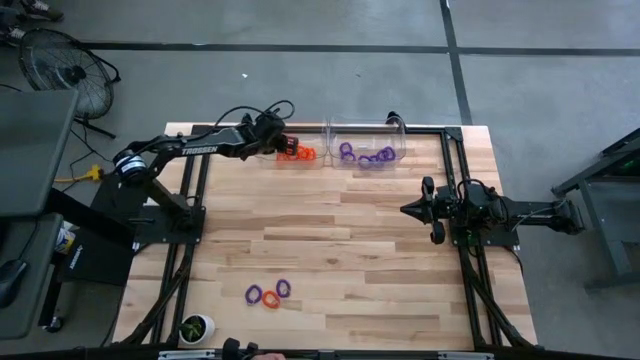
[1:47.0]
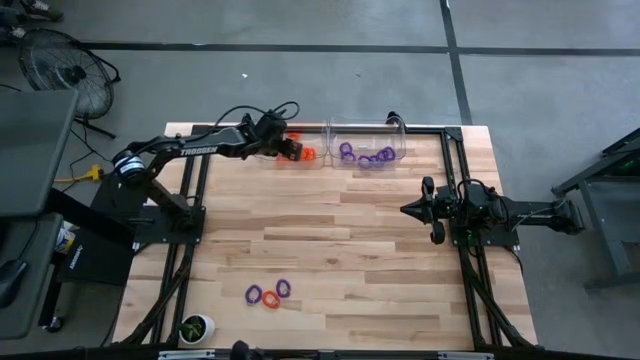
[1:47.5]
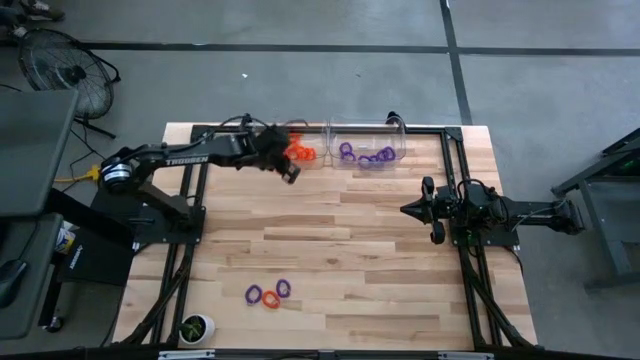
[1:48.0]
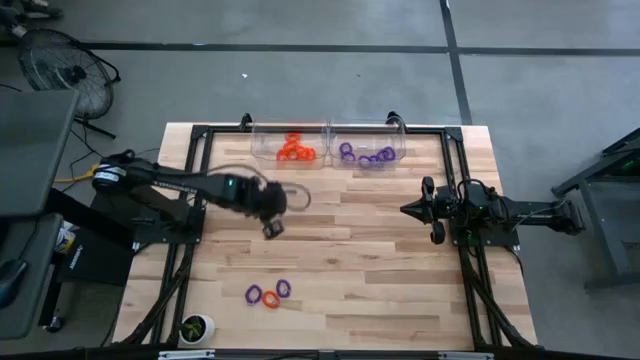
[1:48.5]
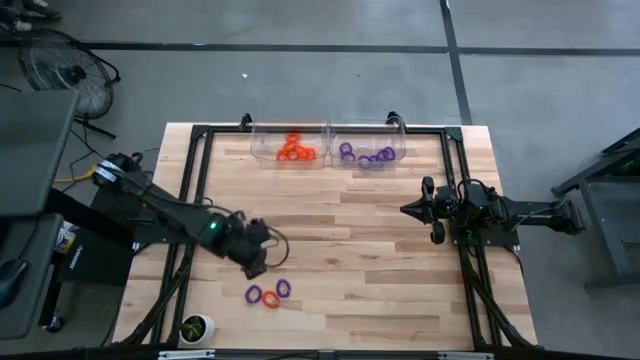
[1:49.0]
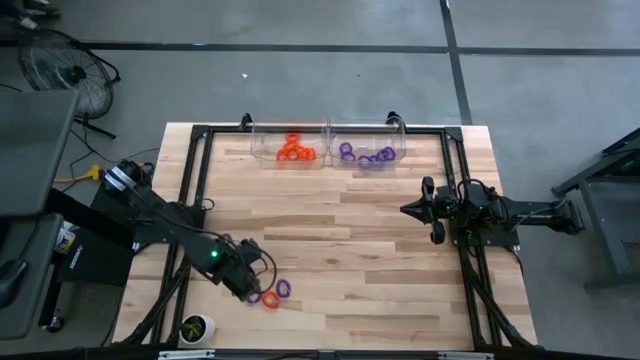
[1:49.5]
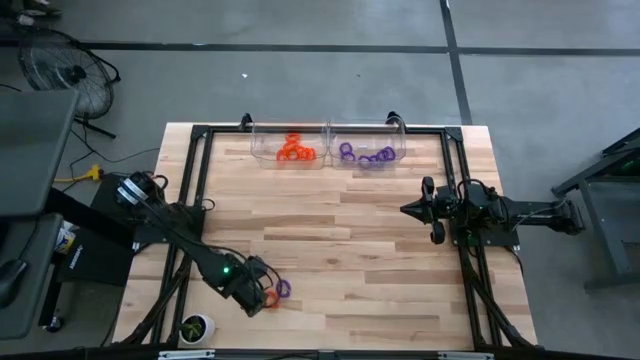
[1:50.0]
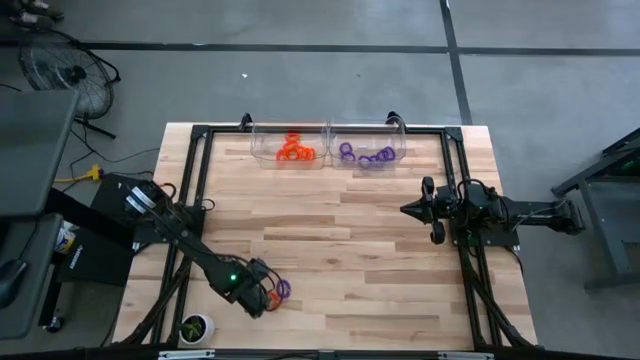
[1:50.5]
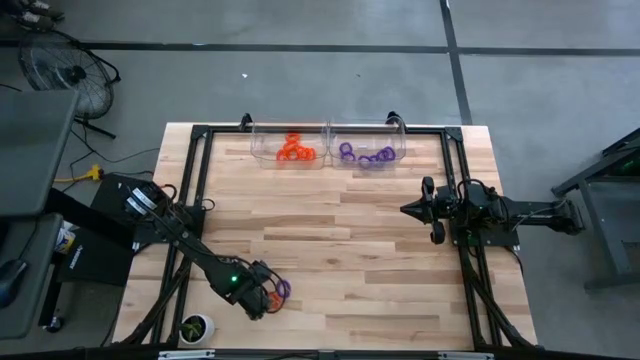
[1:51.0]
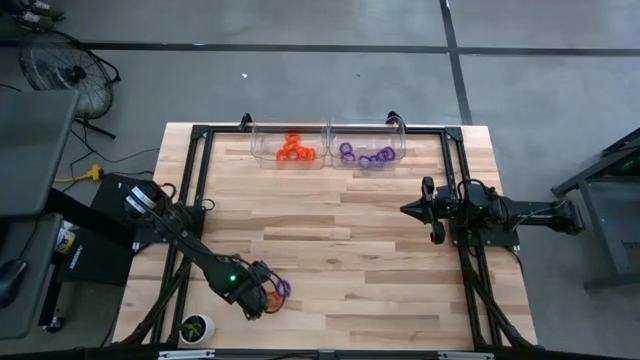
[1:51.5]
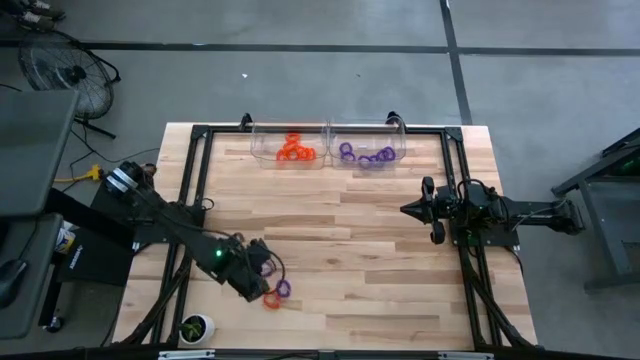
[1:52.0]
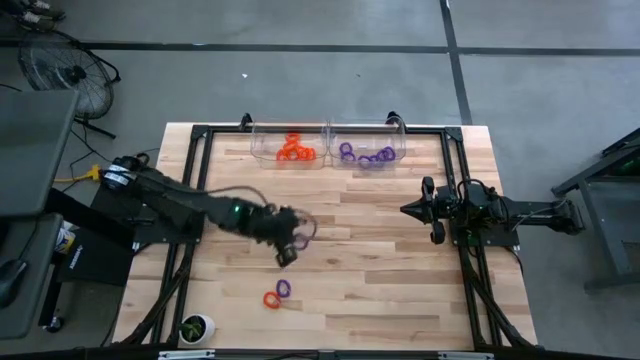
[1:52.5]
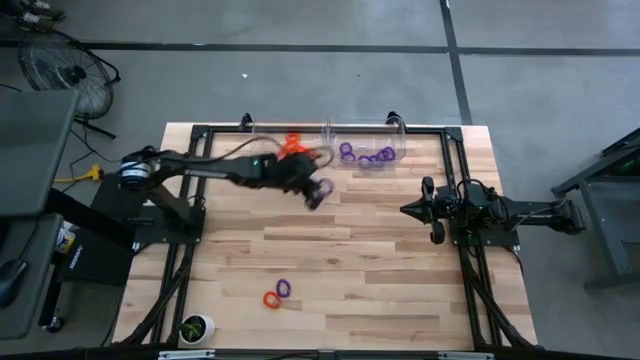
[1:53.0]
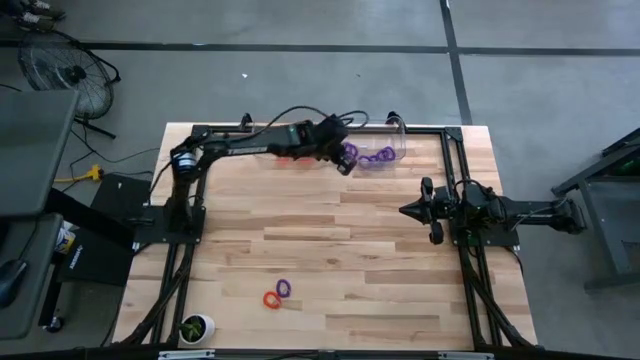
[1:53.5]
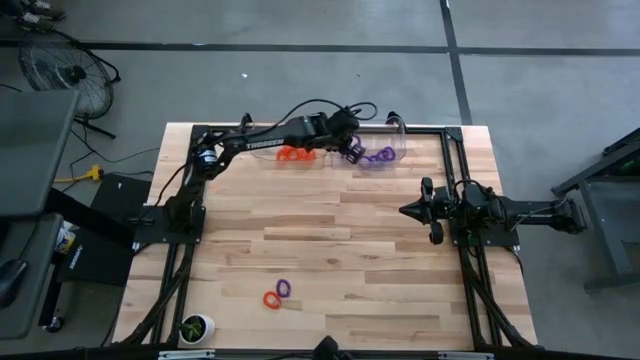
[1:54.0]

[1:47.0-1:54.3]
Task: Sort spring keychains
Put the violet spring keychain into the right transparent bin

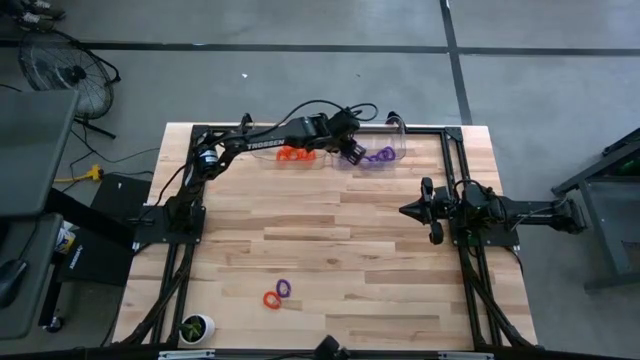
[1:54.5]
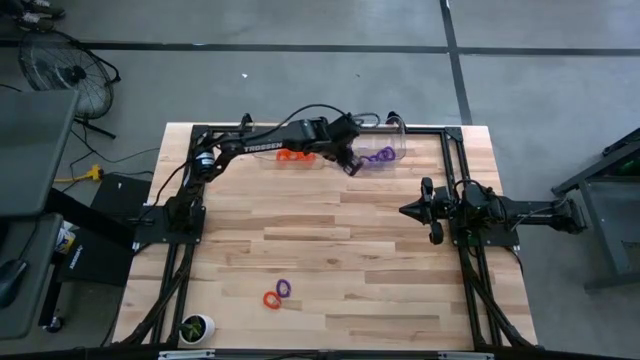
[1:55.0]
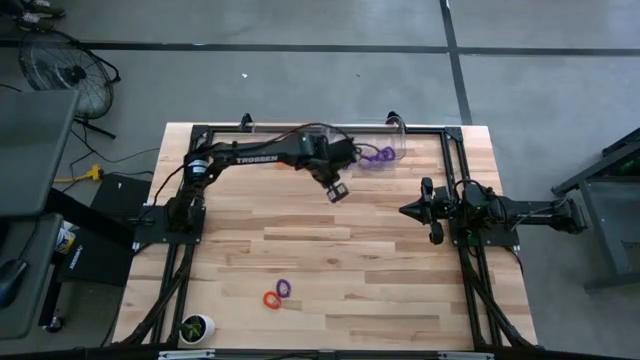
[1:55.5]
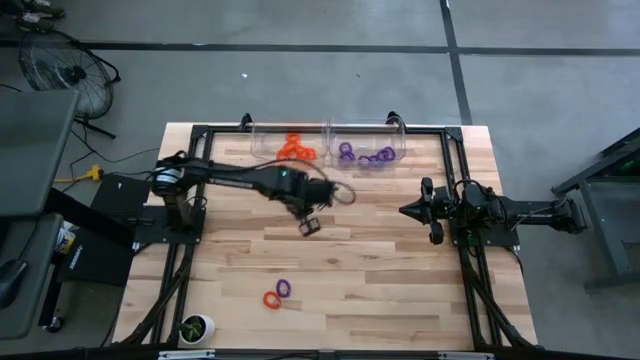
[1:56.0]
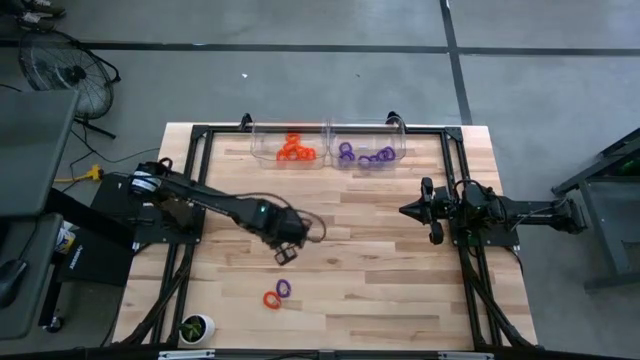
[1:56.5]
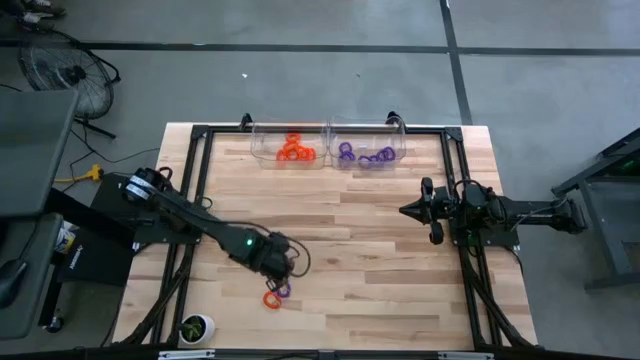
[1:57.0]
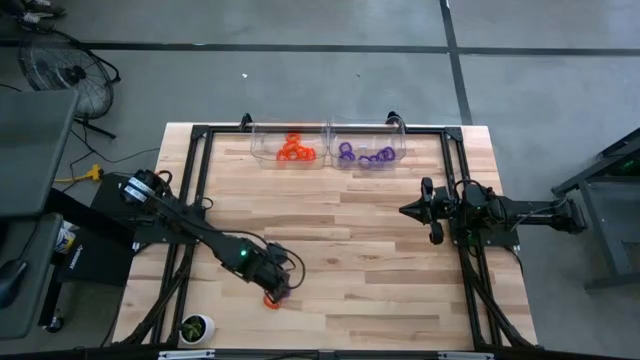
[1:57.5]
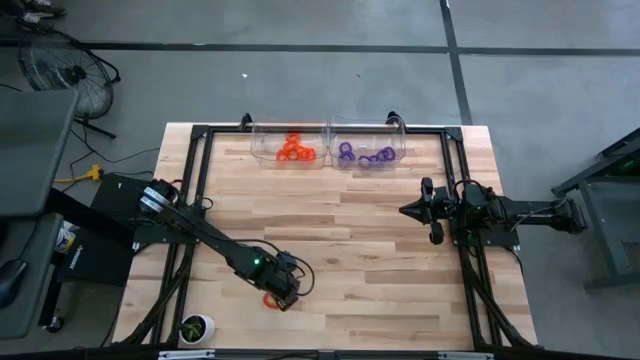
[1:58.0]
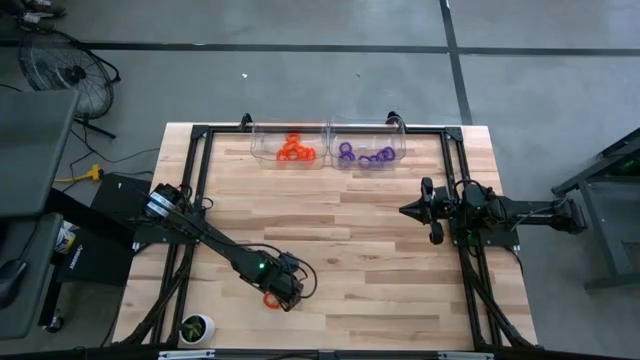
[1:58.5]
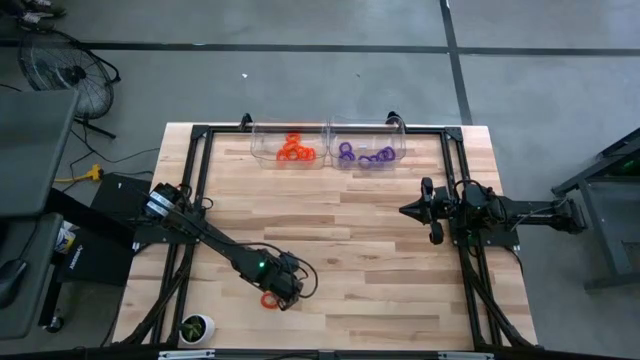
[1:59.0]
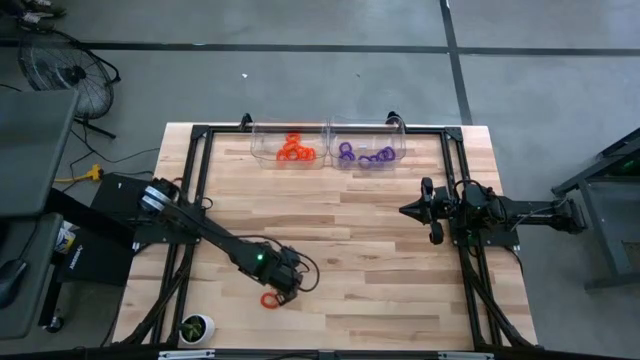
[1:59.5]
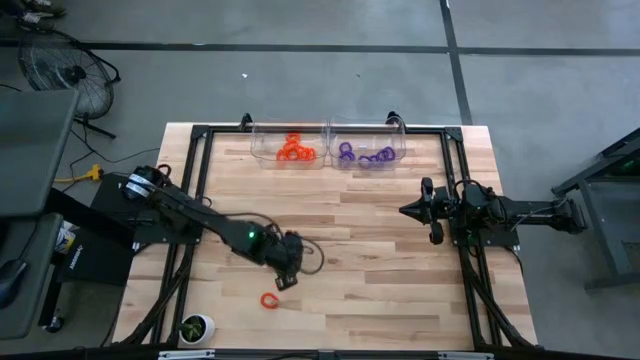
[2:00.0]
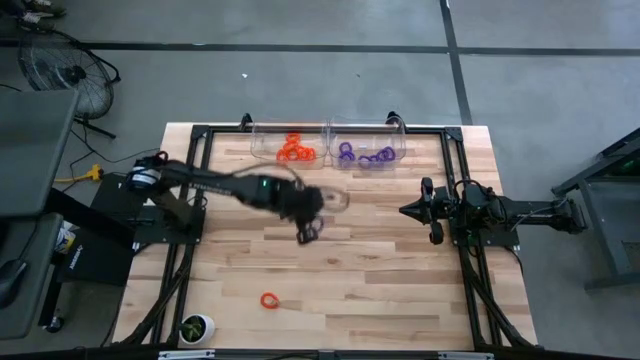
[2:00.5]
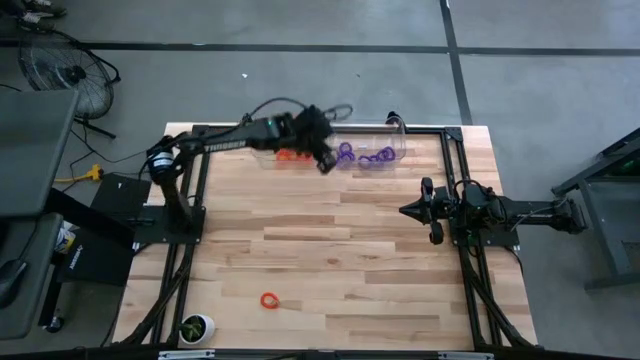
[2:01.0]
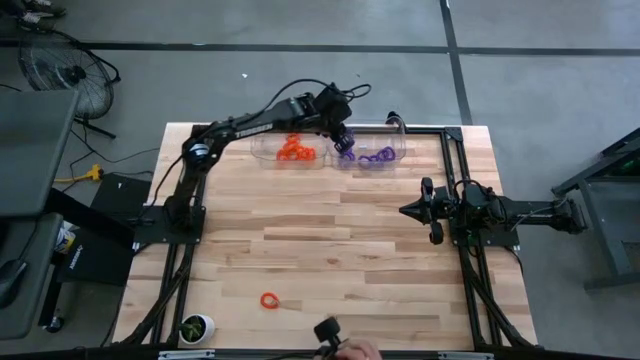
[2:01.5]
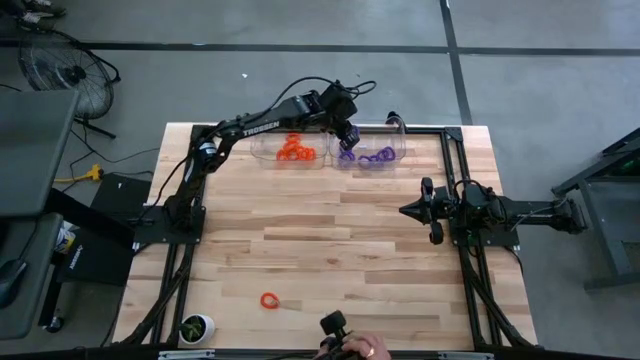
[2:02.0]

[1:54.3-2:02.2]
Put the violet spring keychain into the right transparent bin

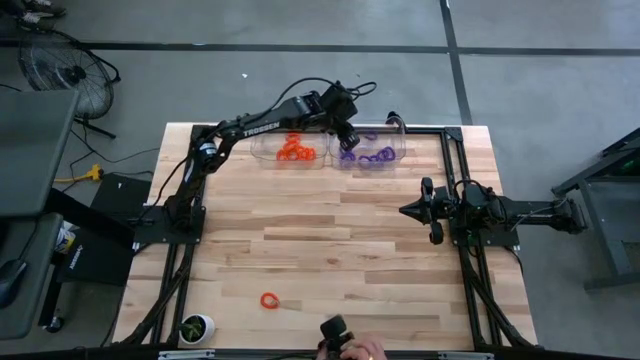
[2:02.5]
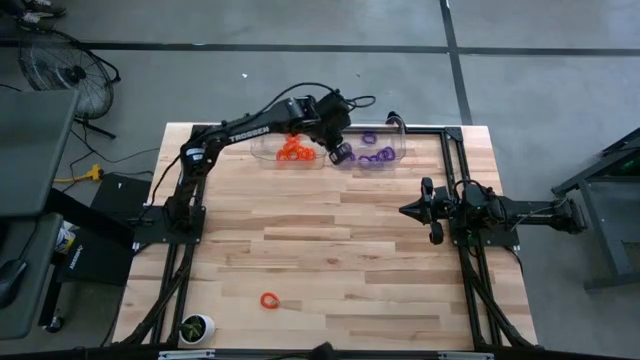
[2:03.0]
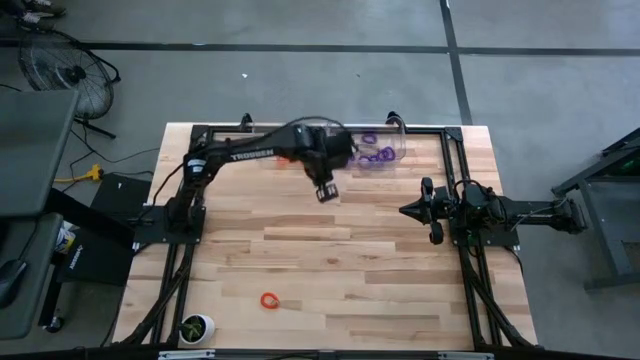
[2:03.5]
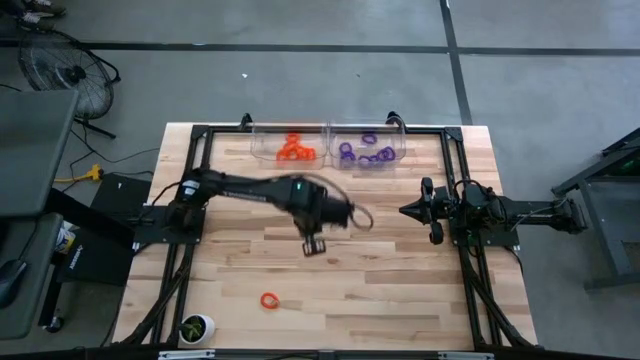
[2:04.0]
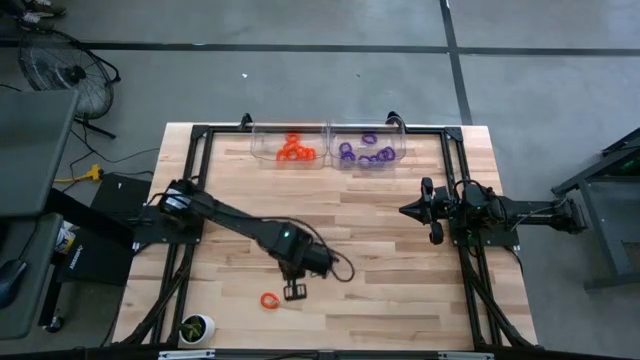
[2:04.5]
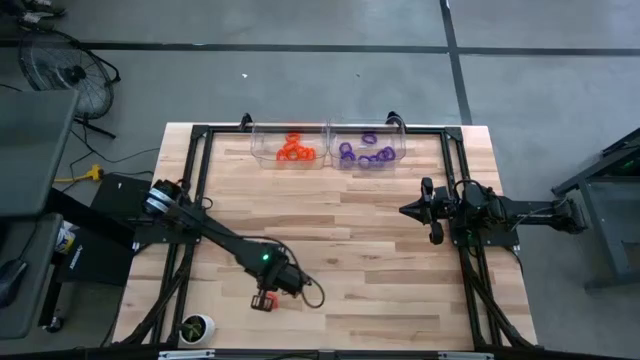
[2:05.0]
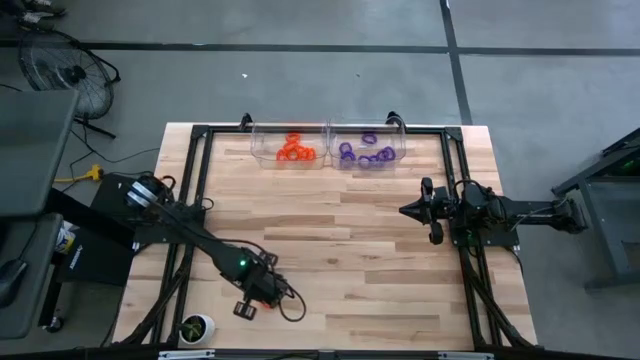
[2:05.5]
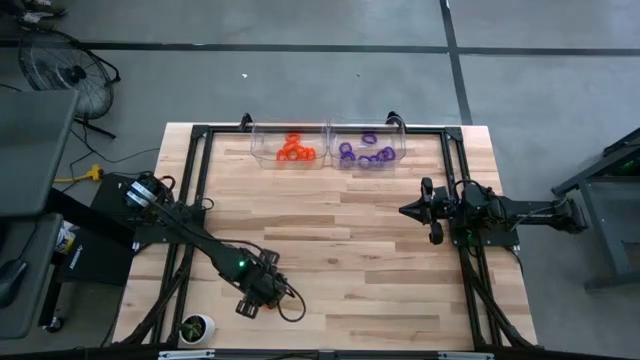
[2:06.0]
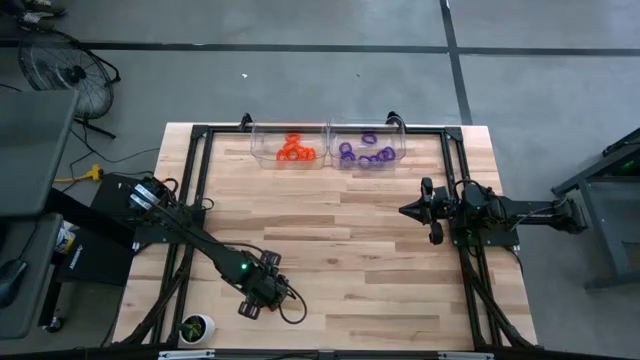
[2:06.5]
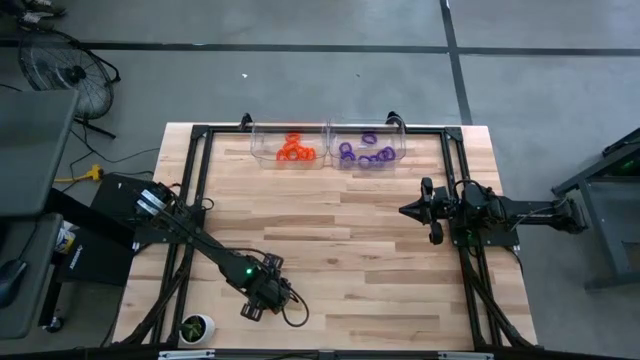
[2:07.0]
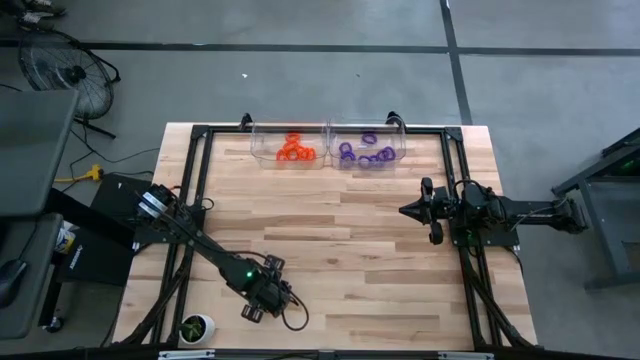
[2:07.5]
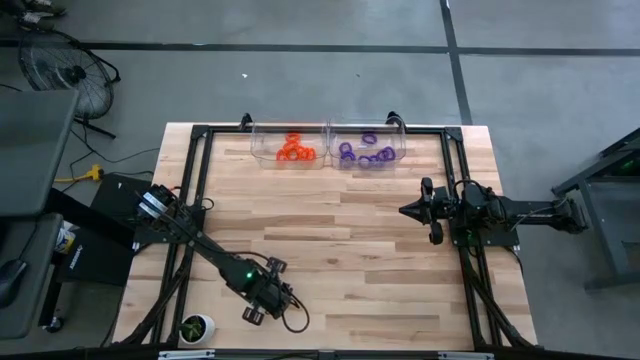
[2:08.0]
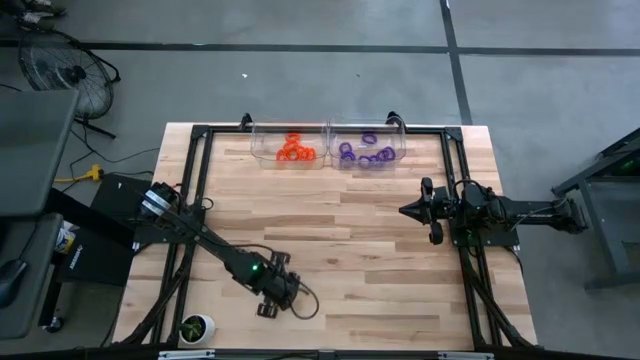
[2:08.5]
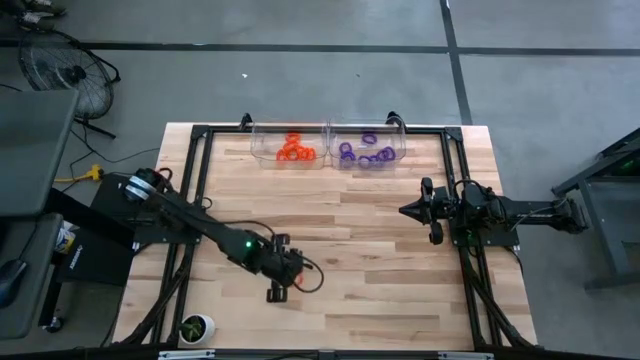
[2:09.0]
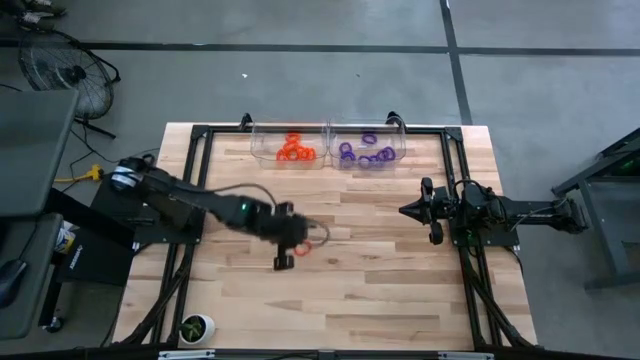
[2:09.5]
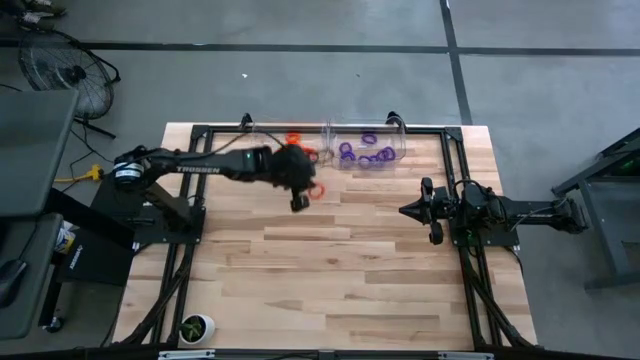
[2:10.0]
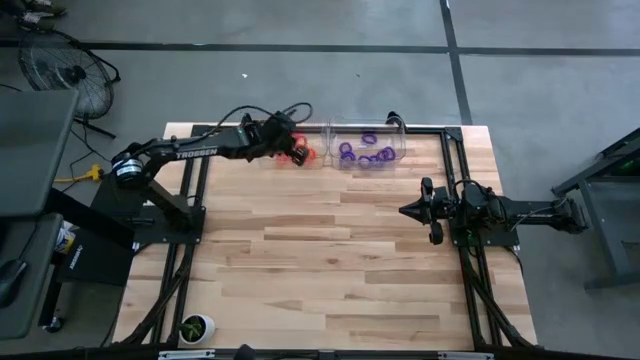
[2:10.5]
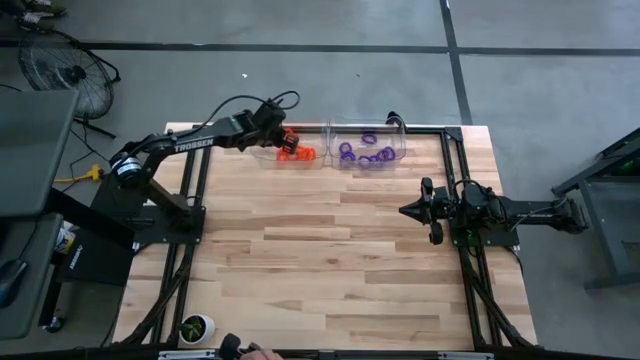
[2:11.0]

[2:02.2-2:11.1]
Put the orange spring keychain into the left transparent bin
